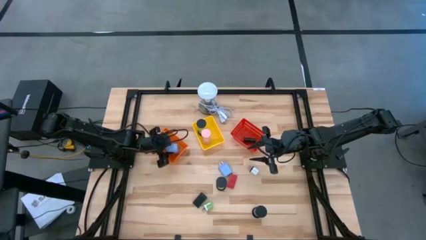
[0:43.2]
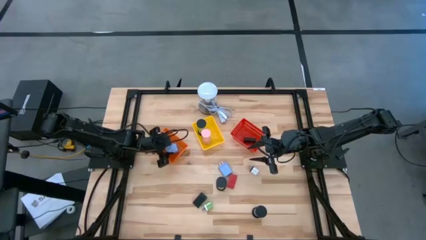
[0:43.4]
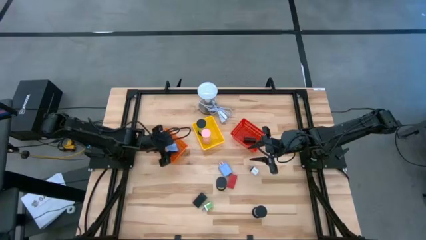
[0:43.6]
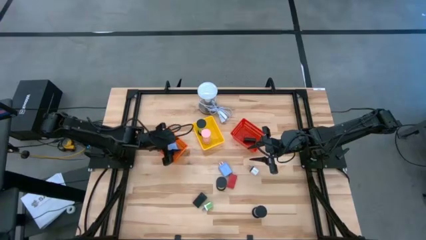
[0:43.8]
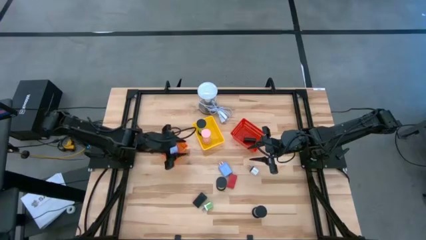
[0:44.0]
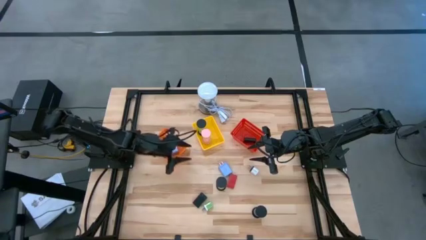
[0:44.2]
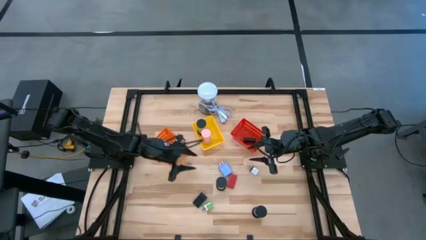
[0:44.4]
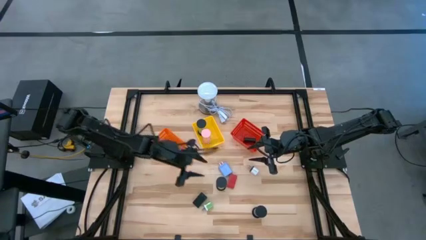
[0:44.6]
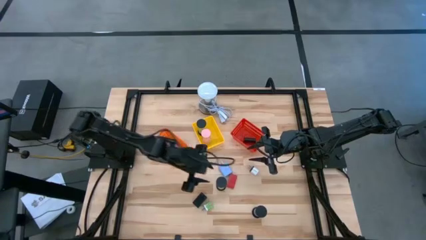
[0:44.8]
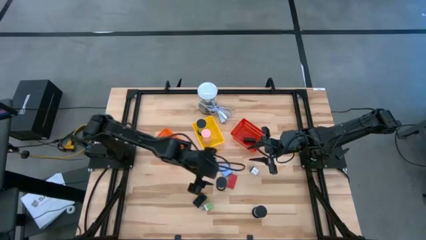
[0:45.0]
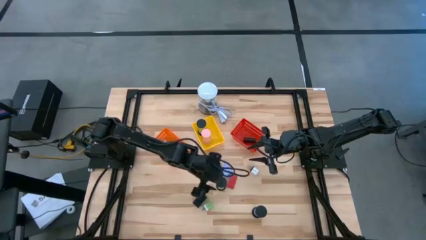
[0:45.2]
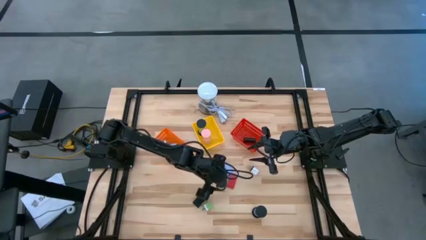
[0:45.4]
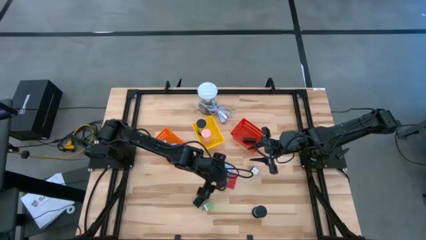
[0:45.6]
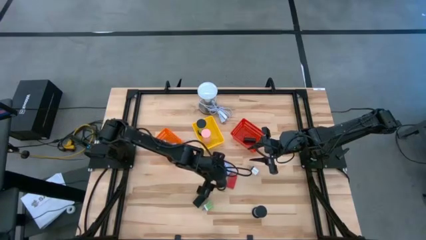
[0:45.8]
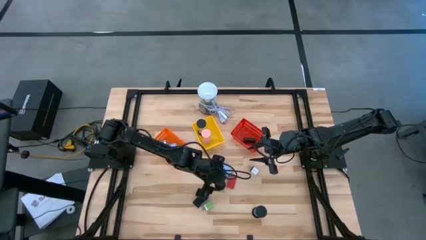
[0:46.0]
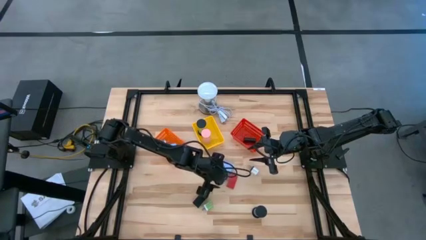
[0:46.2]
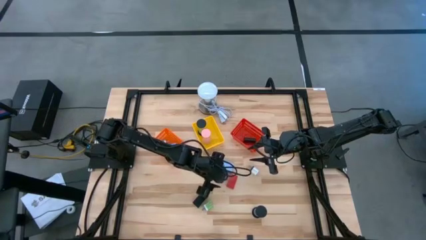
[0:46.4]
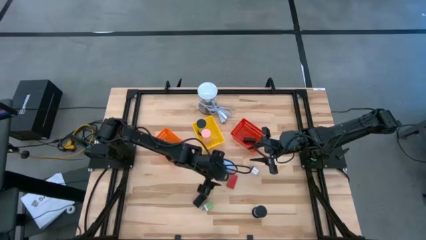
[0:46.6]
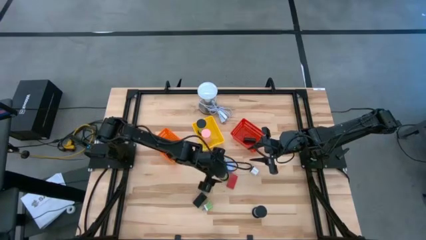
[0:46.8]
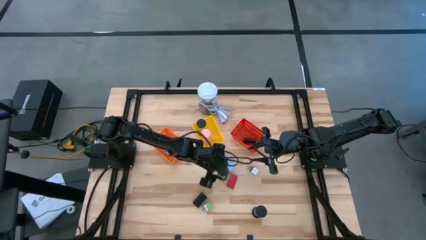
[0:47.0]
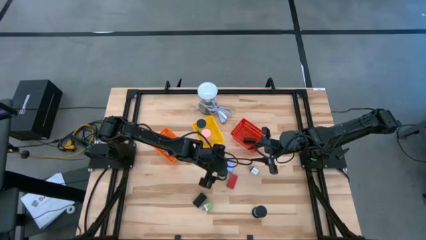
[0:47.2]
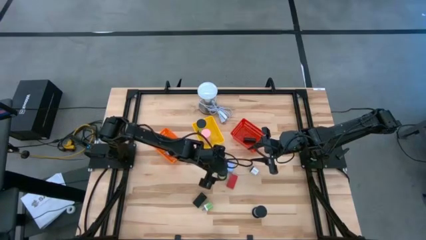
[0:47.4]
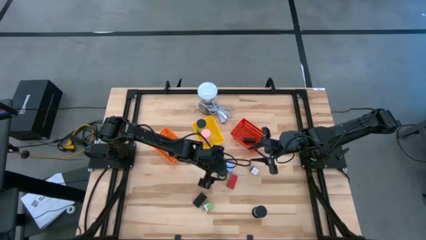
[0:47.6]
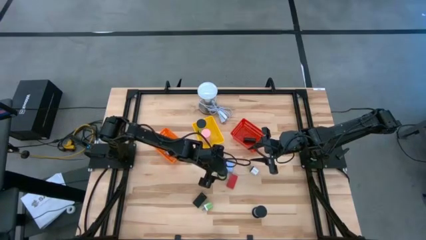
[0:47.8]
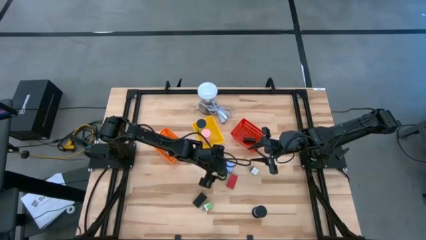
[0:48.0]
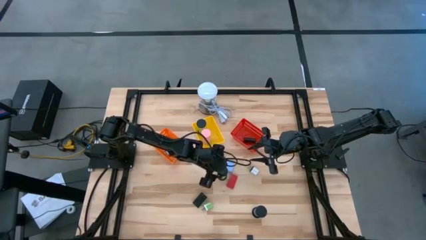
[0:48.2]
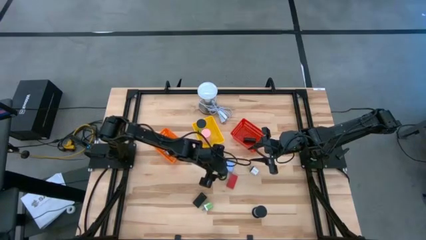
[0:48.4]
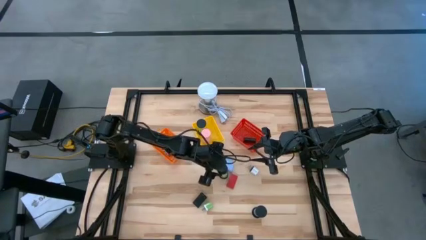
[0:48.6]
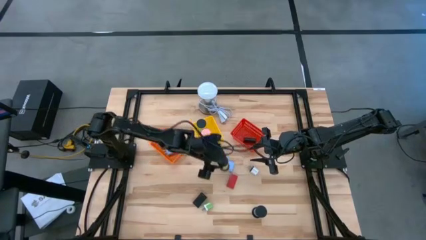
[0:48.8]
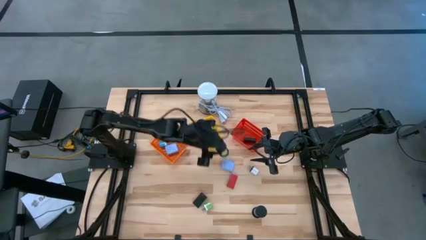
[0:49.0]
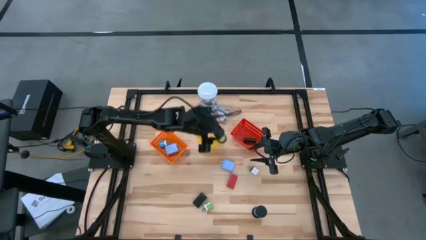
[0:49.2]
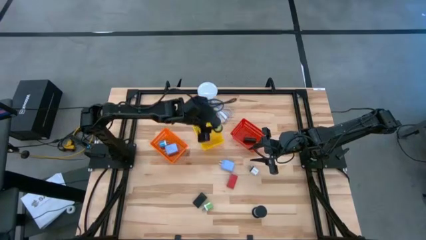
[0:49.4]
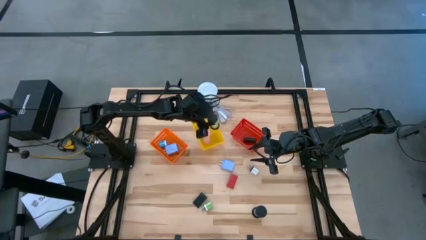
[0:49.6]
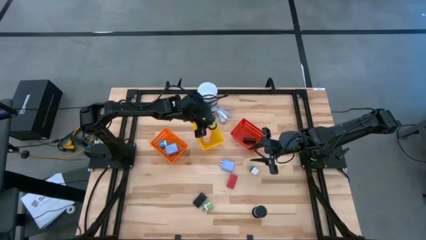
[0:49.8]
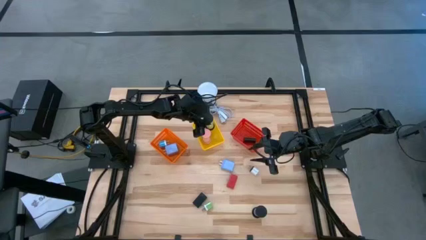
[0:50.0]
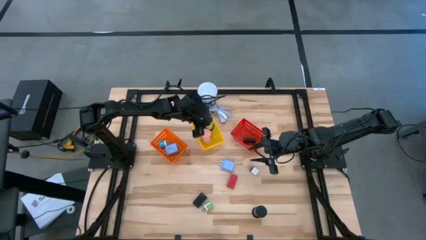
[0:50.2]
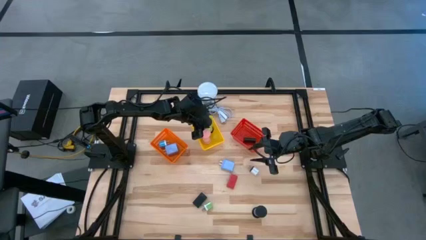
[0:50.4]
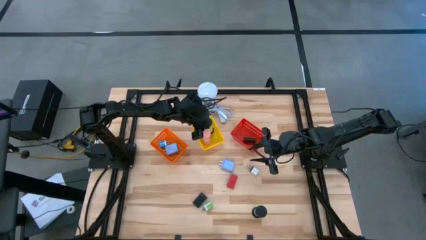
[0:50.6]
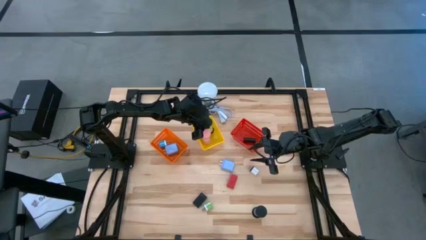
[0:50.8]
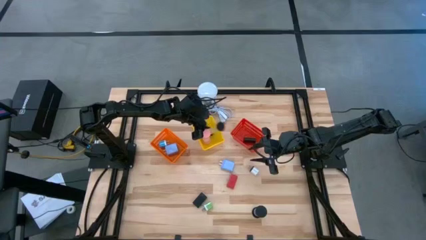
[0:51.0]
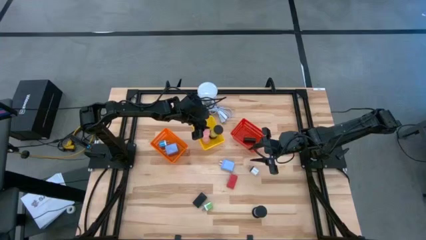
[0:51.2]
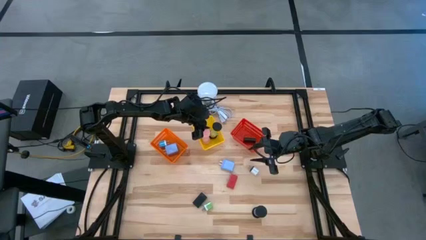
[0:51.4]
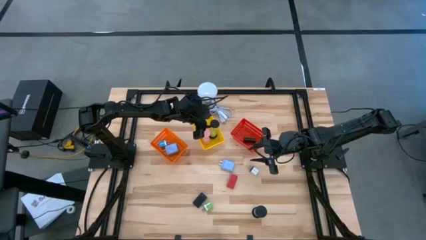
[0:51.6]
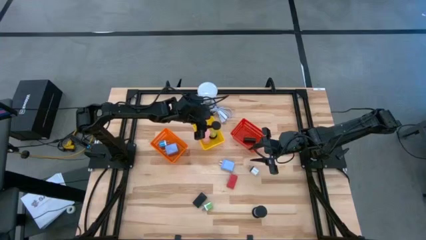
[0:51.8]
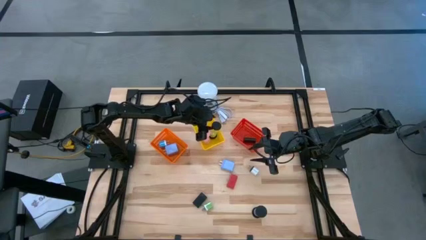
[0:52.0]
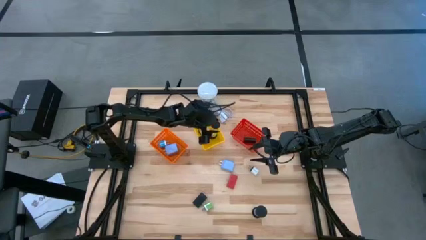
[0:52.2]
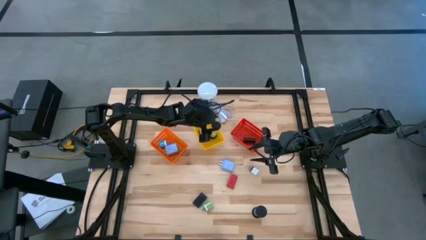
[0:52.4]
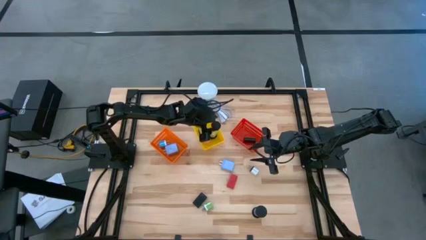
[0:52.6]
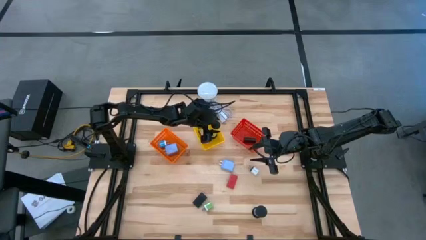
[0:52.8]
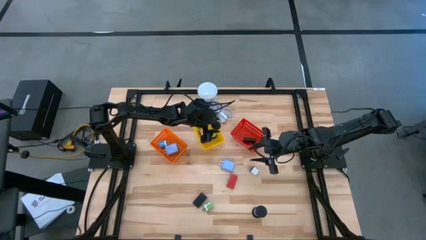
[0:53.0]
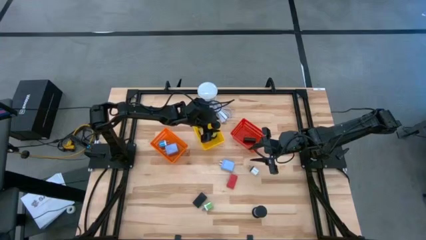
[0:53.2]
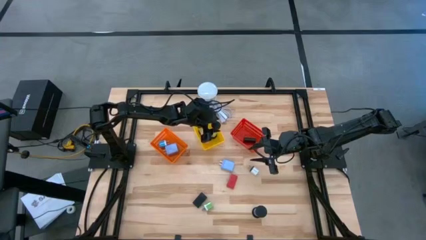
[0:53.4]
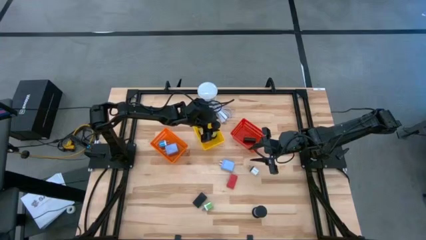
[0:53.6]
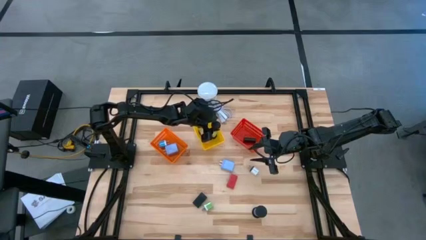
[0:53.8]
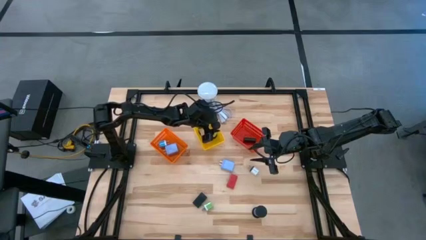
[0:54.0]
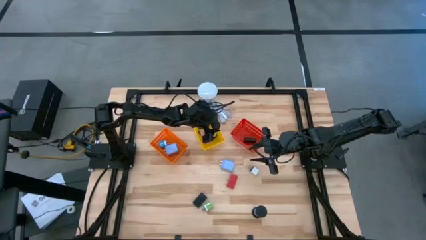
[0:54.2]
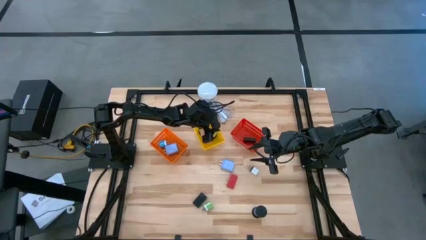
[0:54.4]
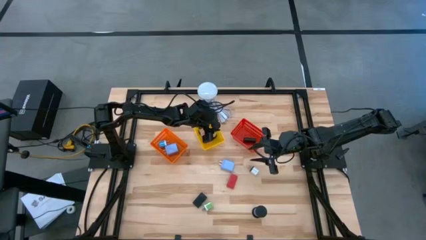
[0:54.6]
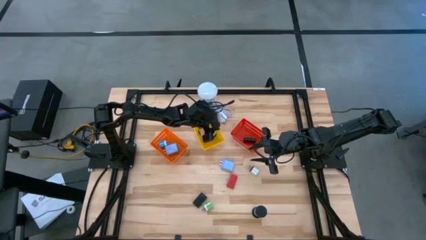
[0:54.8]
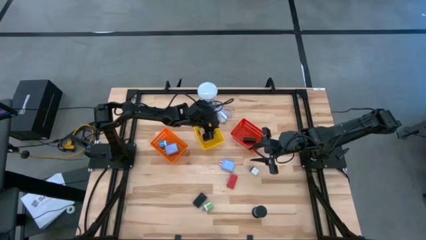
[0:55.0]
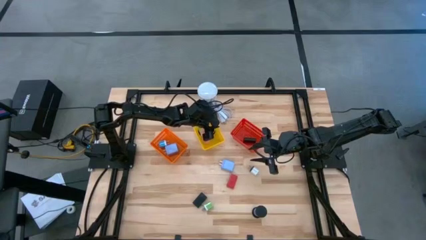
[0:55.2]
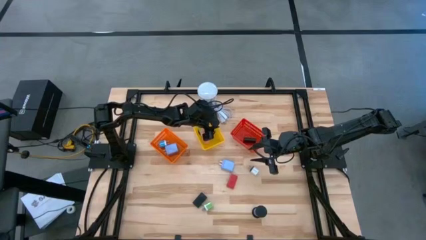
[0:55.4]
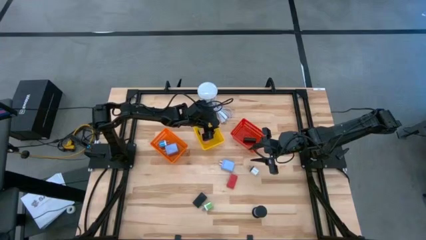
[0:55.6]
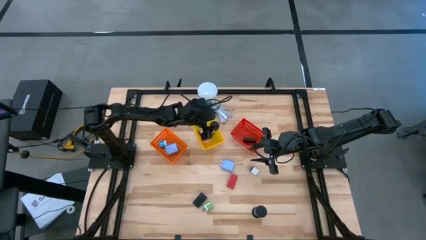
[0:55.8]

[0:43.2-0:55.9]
Task: Pick & Place Office items
Put the green hourglass into the yellow basket

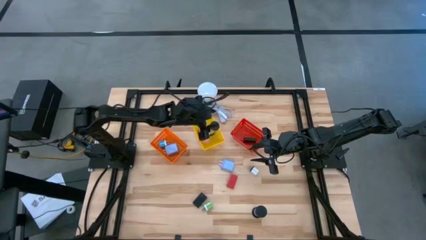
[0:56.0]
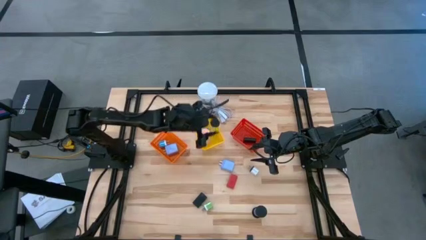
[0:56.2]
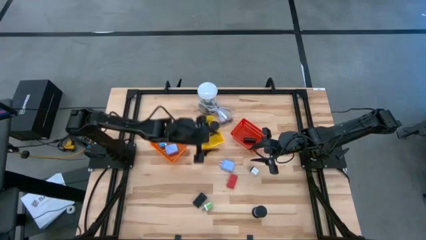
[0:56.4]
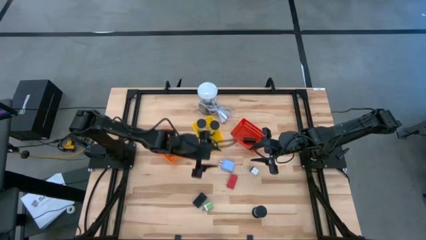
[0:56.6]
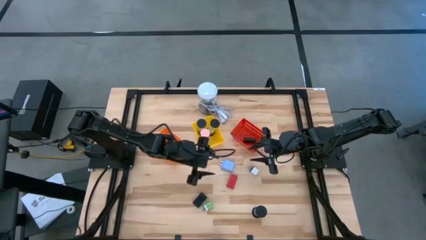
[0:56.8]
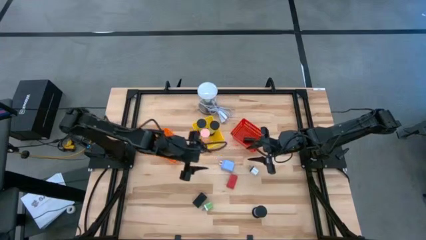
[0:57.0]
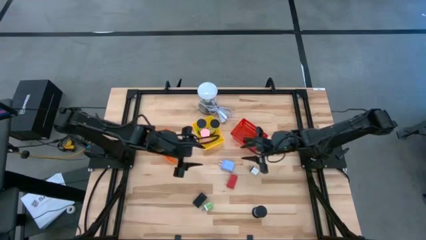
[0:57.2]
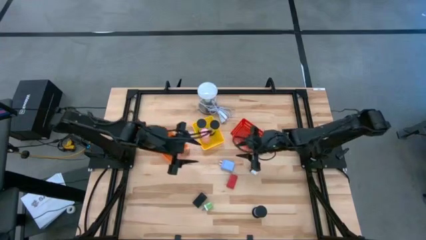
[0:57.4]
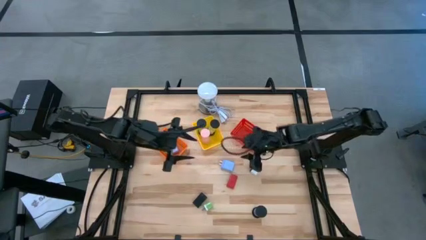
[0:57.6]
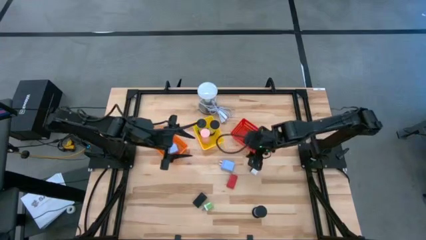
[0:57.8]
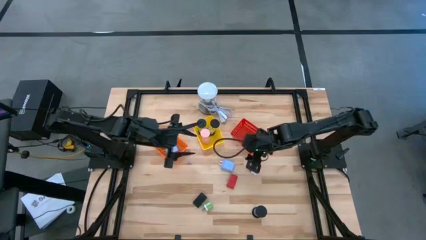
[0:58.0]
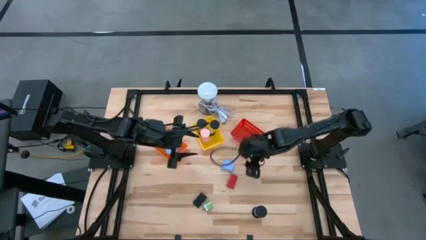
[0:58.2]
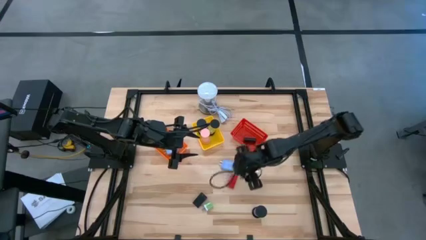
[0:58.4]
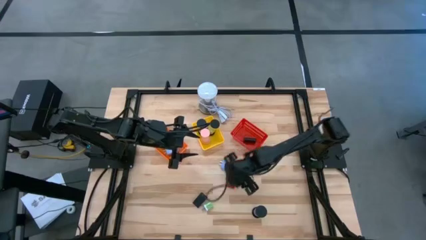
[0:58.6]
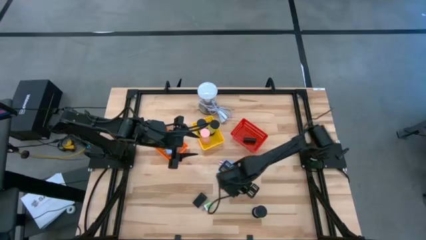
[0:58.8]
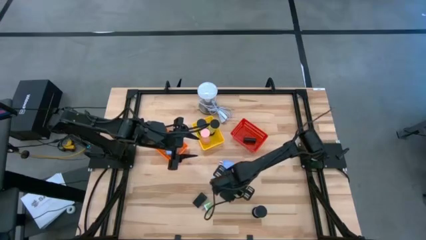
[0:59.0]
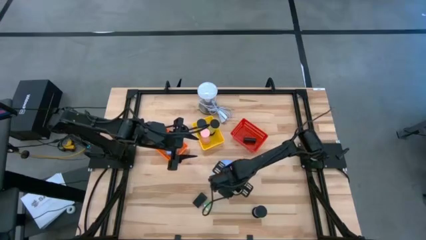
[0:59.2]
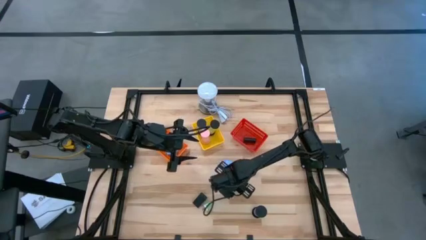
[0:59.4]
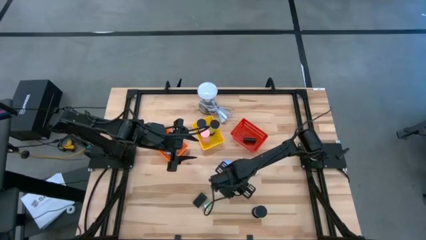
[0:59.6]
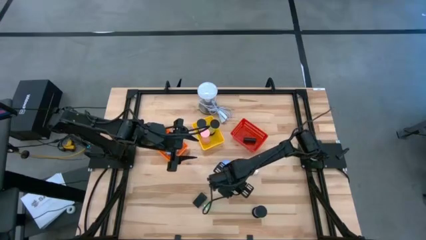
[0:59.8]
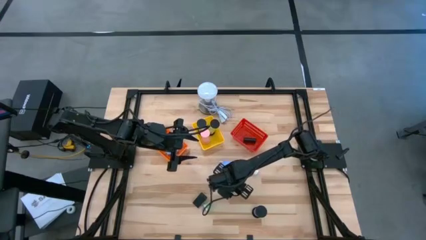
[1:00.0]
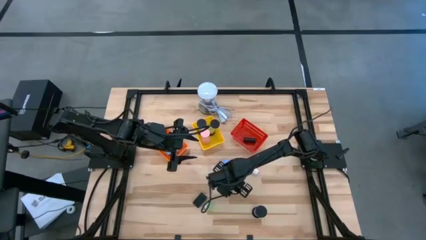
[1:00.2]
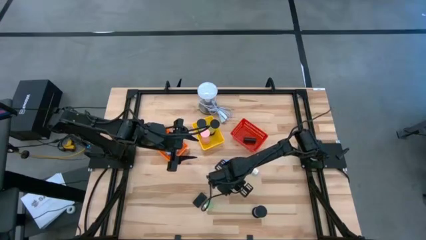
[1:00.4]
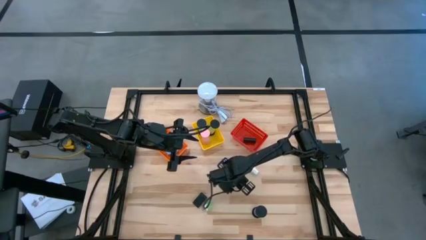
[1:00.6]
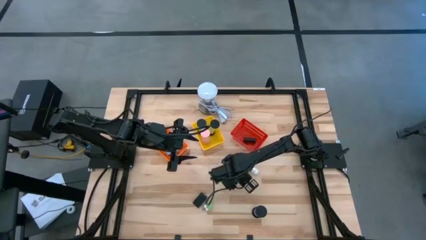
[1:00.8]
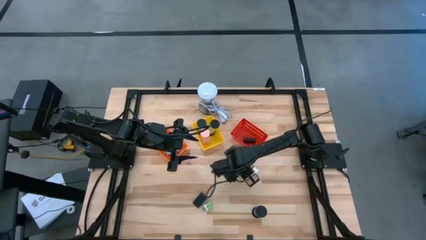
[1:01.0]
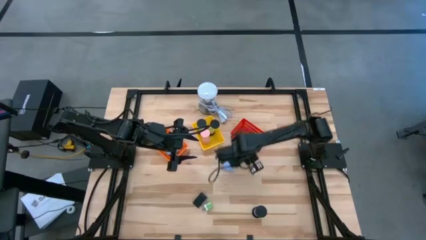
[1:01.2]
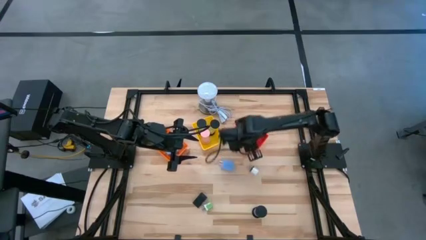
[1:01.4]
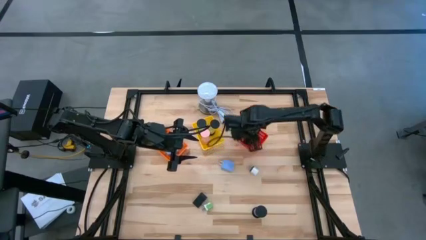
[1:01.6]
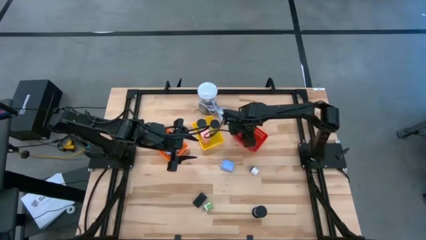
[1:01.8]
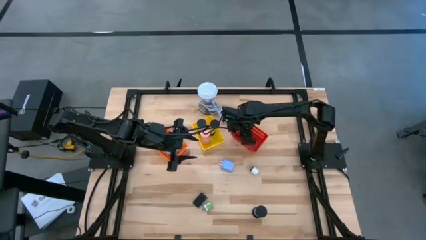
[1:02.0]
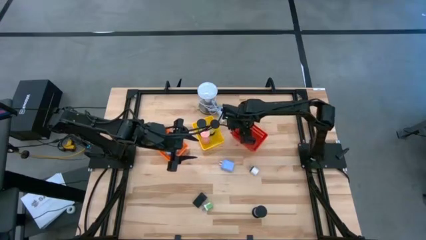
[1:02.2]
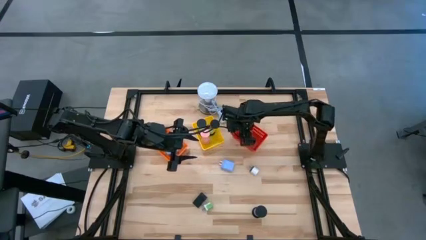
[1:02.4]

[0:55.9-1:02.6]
Put the red digital timer into the red basket
